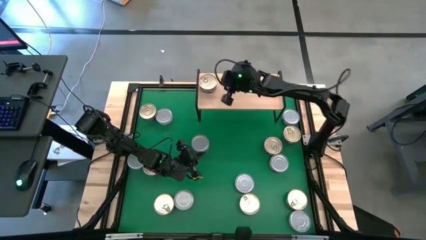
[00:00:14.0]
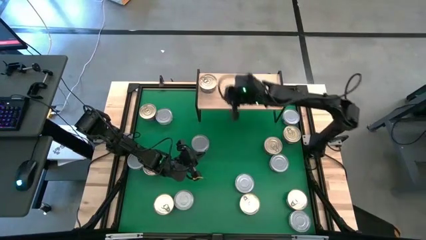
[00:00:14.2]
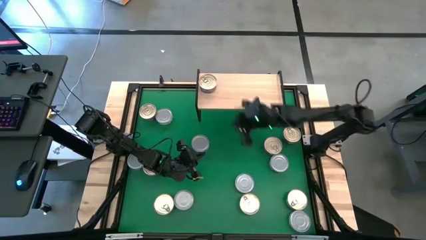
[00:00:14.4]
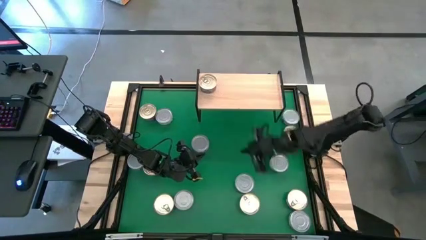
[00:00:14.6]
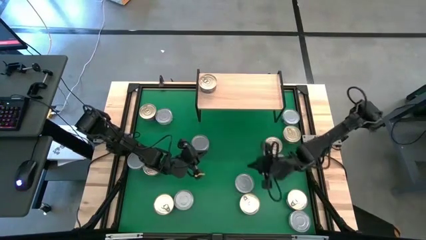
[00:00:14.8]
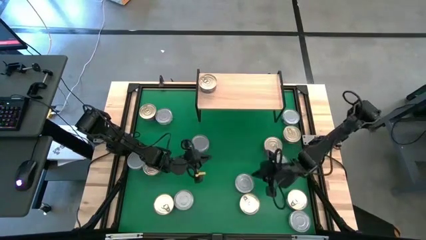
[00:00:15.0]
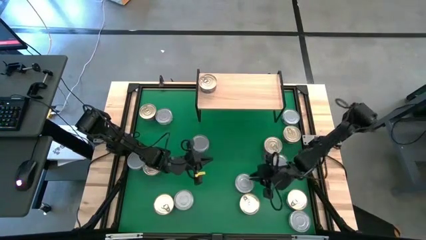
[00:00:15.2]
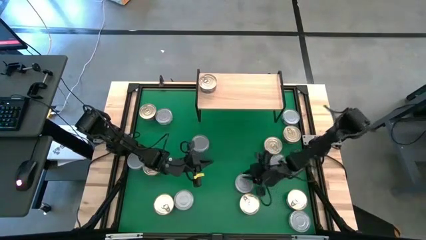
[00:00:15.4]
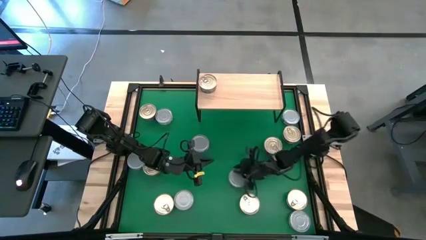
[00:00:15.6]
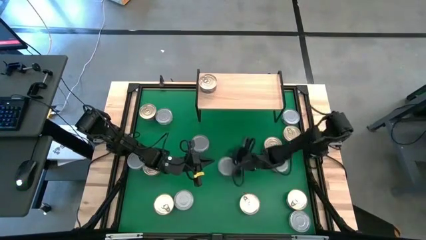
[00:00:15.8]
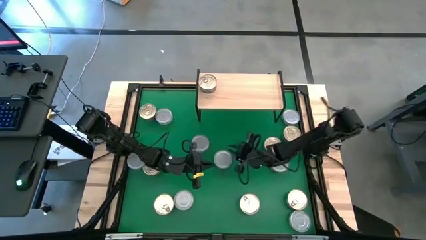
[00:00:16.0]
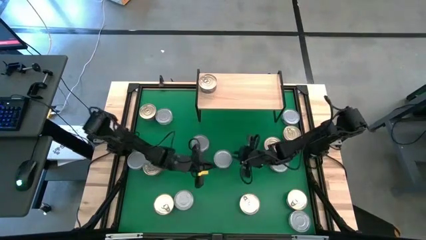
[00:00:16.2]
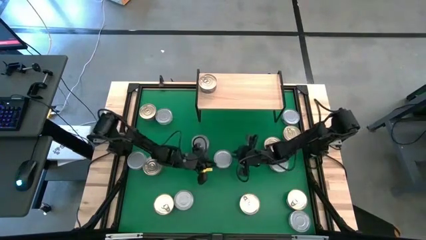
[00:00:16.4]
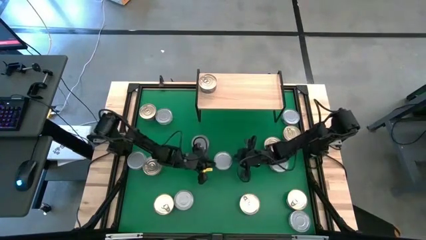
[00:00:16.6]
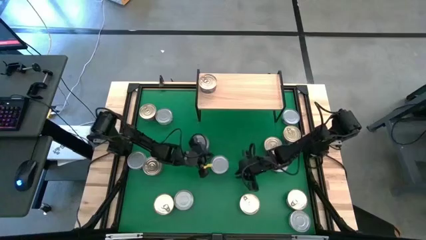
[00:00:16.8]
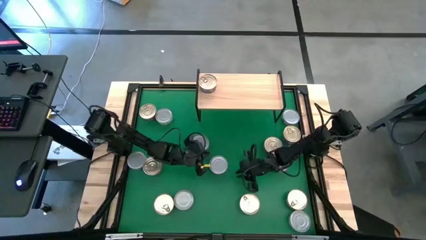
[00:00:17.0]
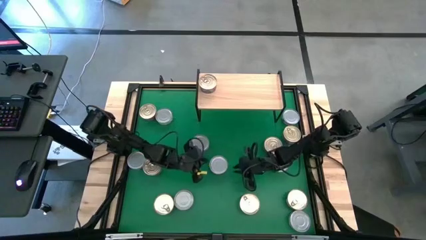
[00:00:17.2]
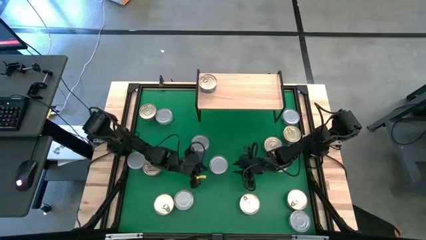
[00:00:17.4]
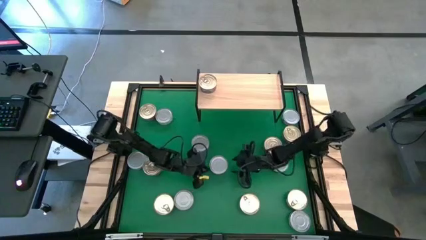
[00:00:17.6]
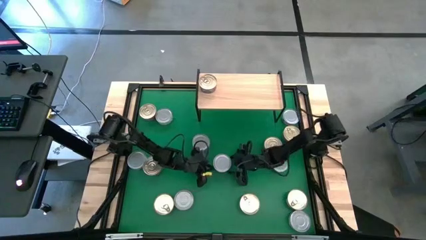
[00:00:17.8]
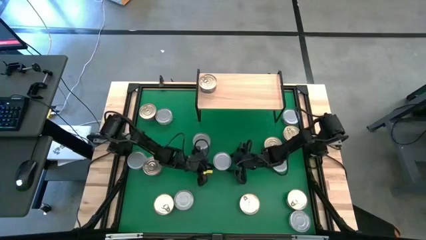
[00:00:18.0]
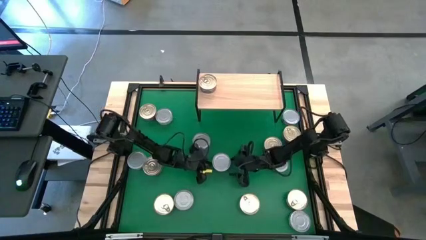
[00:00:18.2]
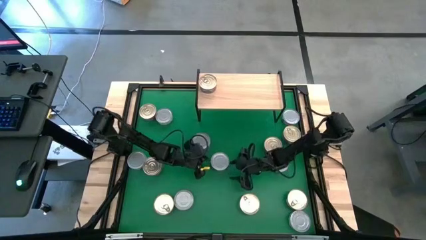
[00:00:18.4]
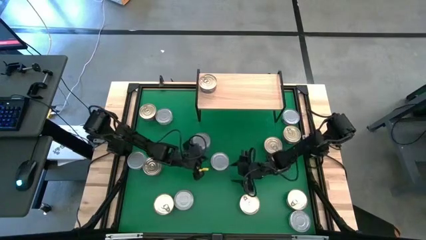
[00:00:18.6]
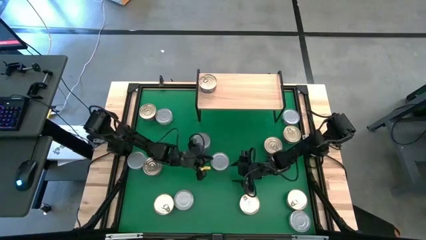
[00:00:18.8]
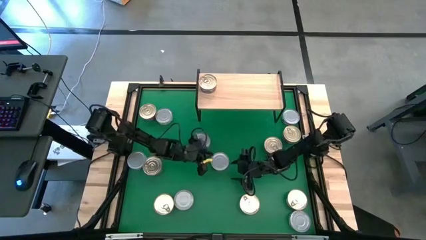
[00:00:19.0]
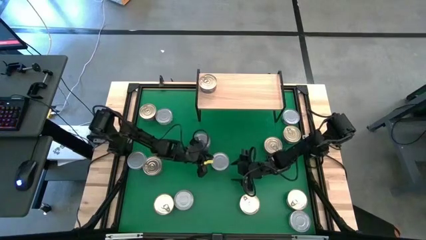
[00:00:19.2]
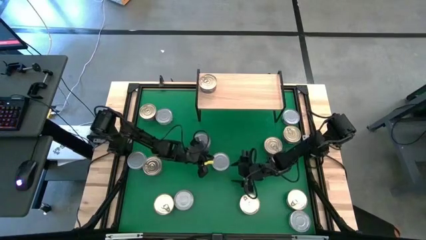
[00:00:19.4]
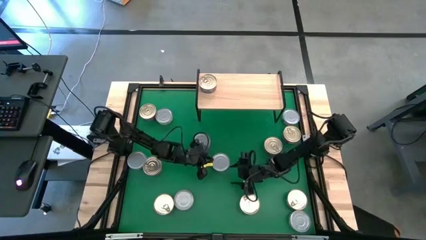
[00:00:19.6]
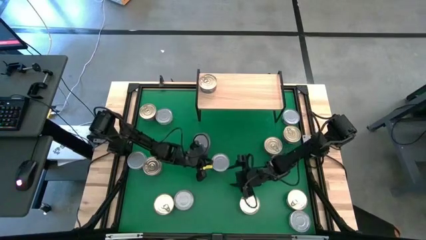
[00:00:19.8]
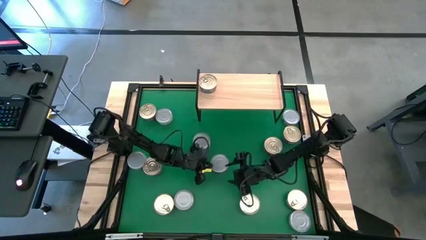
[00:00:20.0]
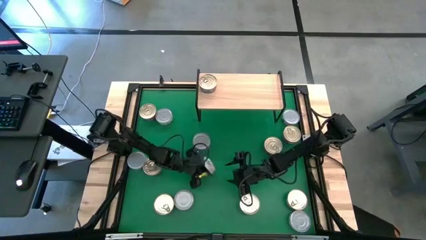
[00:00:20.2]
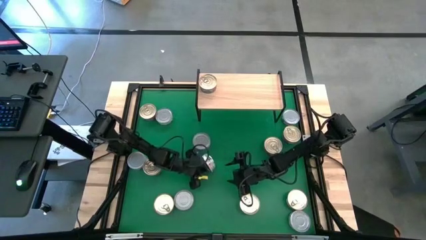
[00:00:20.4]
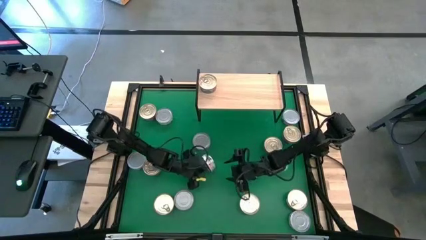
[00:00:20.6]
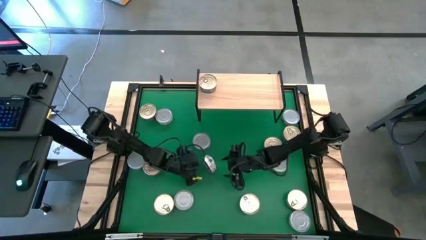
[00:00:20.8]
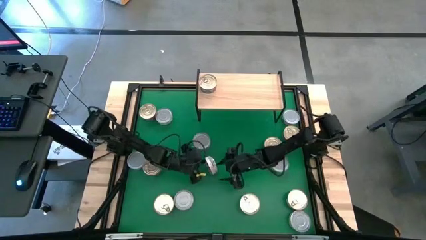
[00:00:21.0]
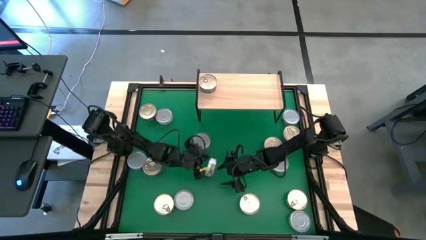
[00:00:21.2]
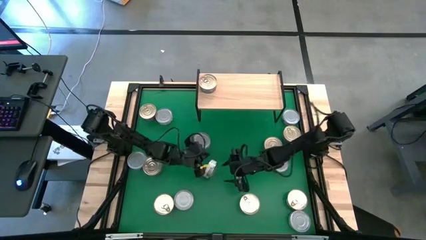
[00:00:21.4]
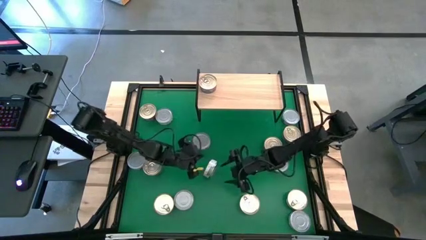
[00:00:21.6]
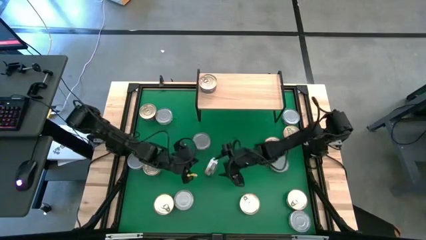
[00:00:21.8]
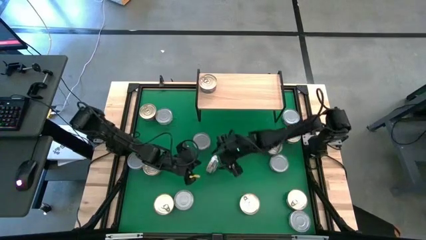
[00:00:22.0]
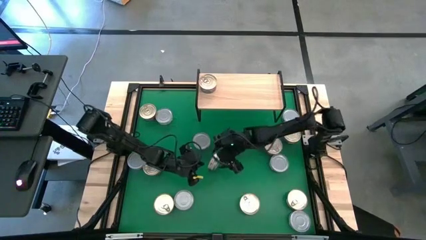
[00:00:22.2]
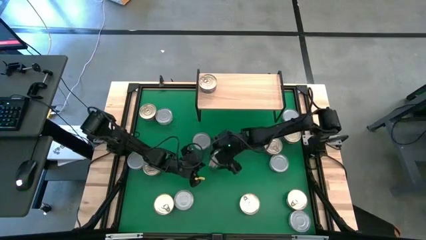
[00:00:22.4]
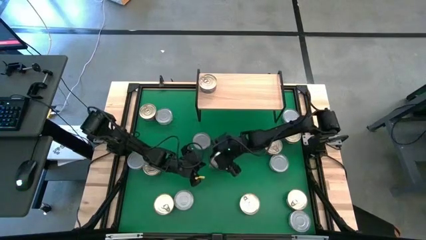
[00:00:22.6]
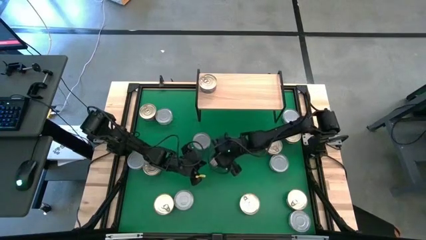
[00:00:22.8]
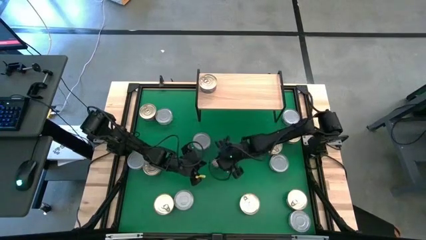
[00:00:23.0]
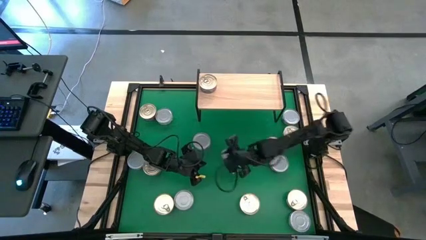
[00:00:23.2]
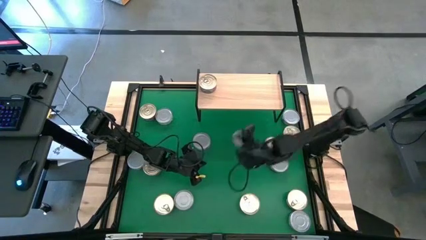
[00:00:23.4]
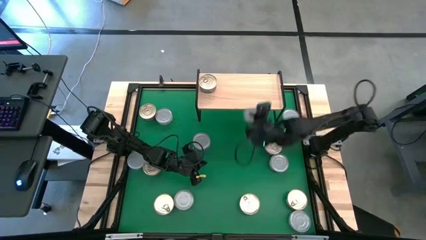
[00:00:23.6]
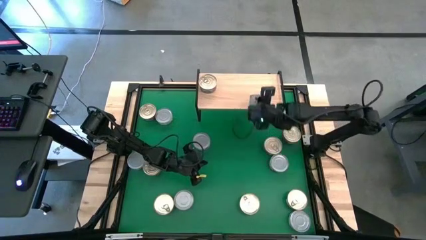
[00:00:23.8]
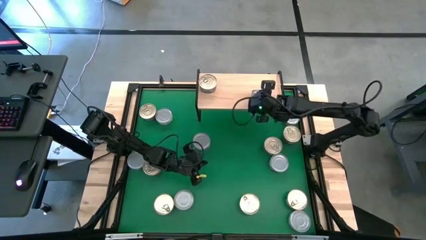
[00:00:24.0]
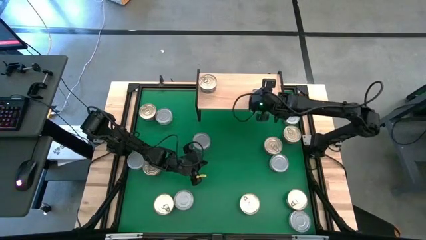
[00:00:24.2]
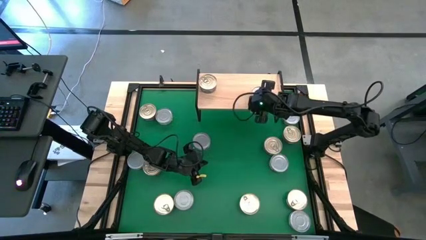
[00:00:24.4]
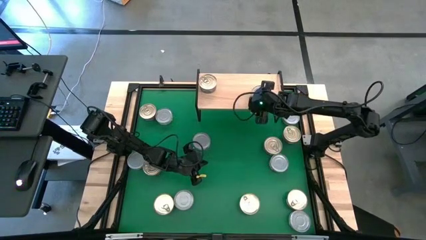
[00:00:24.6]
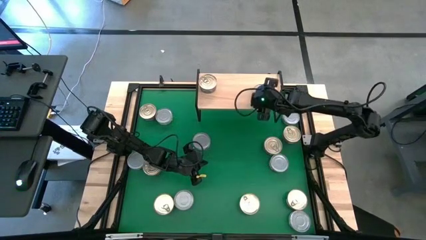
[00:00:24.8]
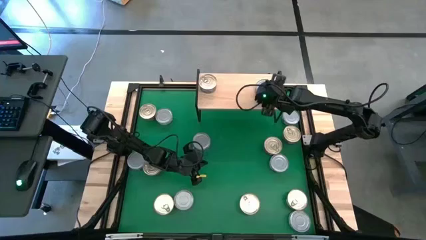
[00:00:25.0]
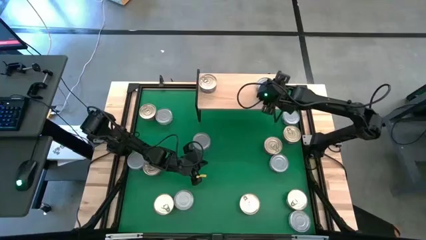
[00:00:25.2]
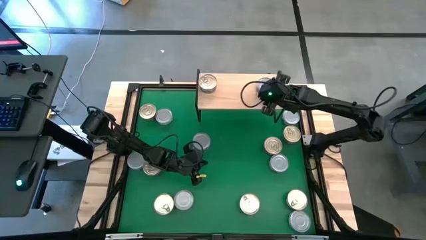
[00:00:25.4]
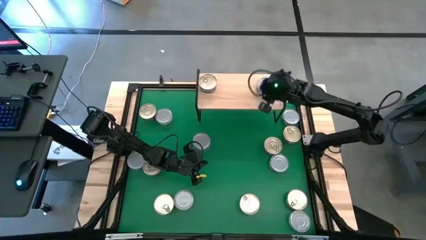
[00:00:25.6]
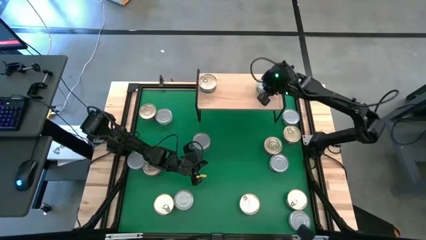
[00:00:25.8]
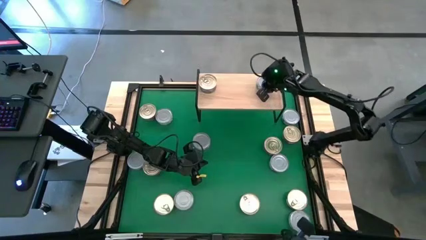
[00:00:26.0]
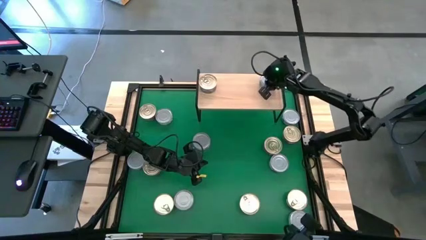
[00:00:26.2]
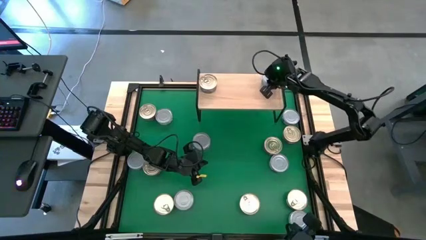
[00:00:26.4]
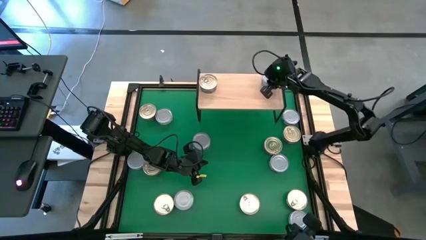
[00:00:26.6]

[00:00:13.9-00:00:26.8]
Task: Stack canned seafood by type on shelf
Put the green tuna can on the shelf

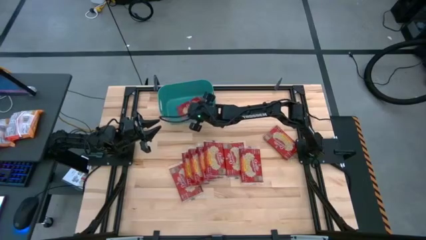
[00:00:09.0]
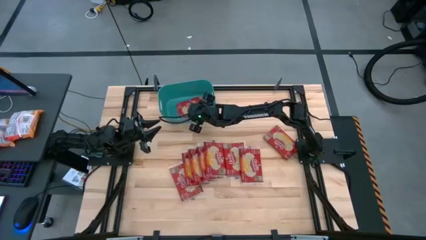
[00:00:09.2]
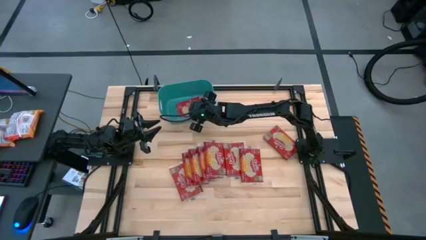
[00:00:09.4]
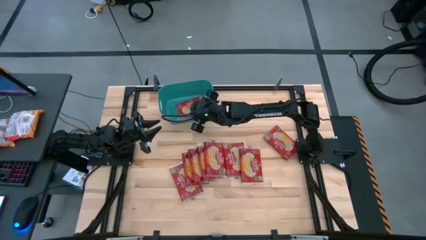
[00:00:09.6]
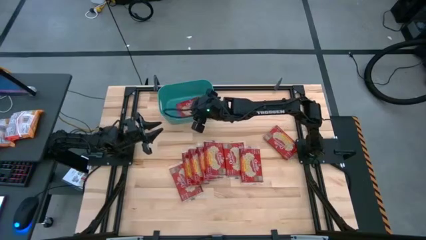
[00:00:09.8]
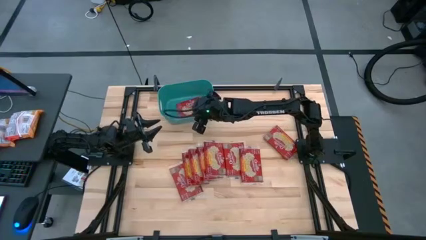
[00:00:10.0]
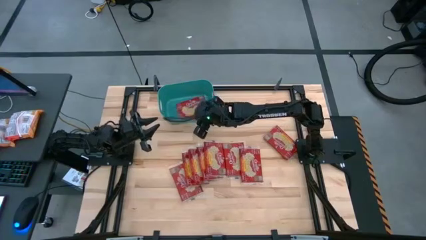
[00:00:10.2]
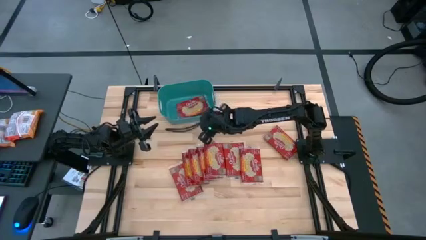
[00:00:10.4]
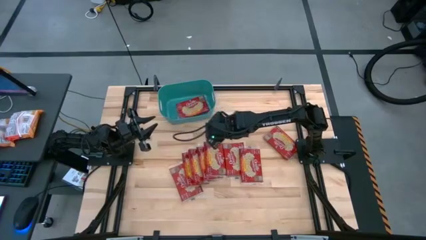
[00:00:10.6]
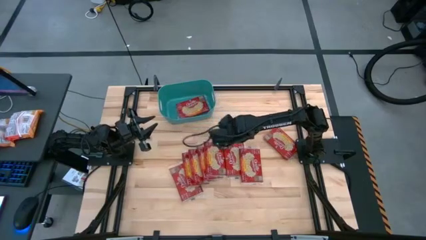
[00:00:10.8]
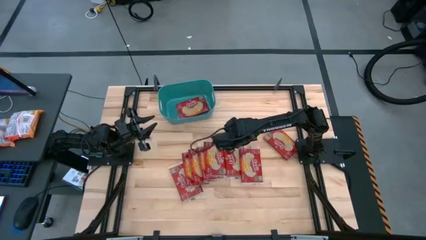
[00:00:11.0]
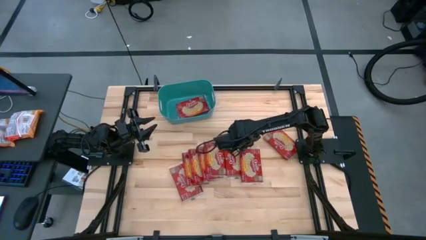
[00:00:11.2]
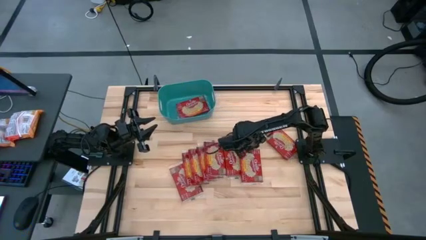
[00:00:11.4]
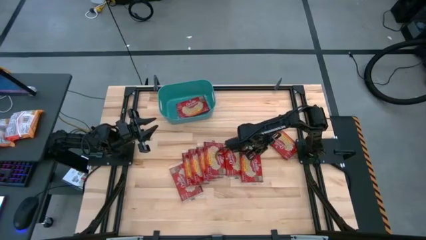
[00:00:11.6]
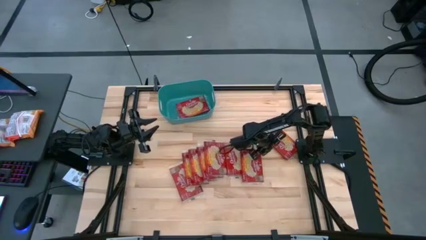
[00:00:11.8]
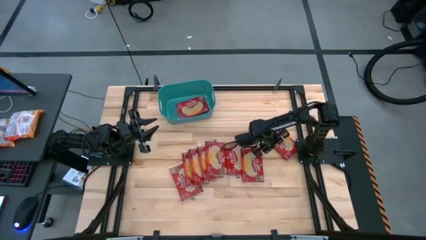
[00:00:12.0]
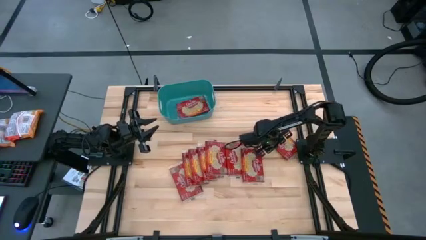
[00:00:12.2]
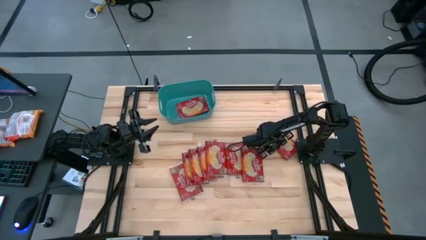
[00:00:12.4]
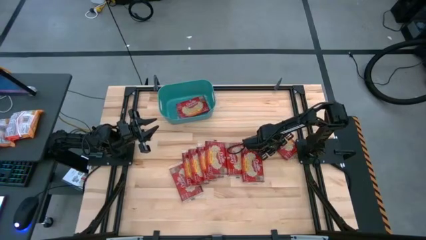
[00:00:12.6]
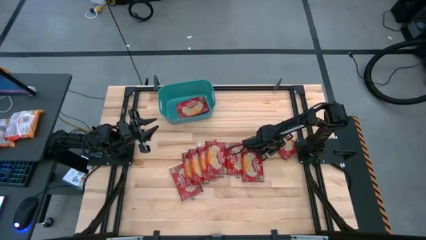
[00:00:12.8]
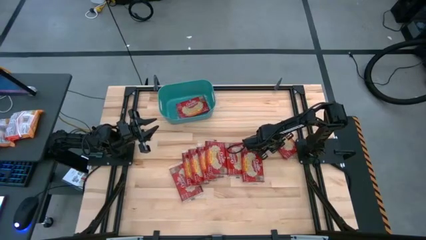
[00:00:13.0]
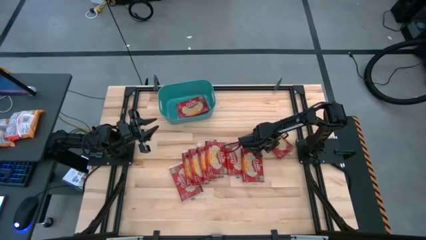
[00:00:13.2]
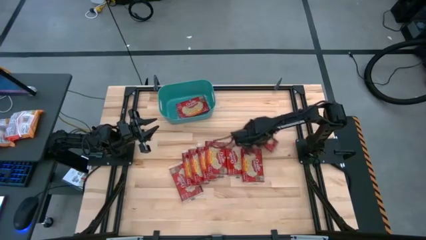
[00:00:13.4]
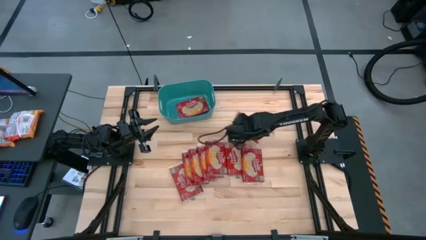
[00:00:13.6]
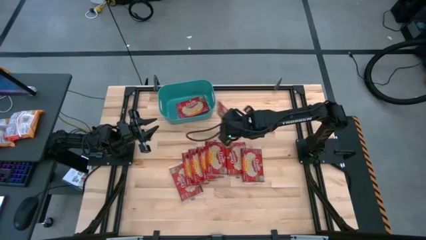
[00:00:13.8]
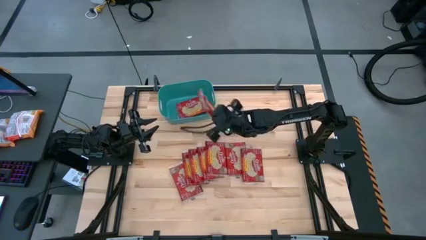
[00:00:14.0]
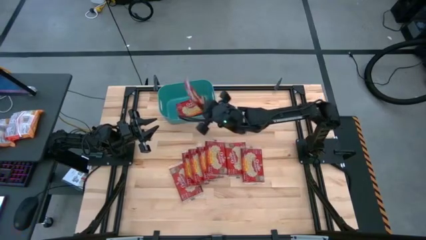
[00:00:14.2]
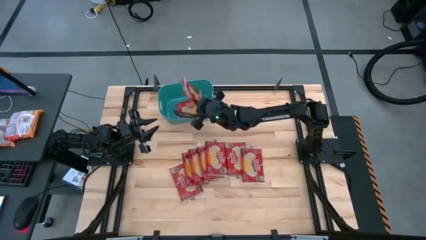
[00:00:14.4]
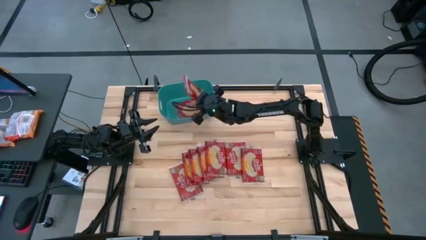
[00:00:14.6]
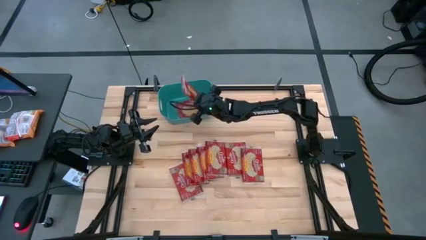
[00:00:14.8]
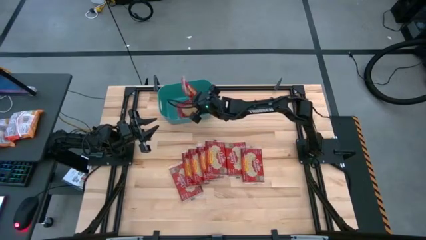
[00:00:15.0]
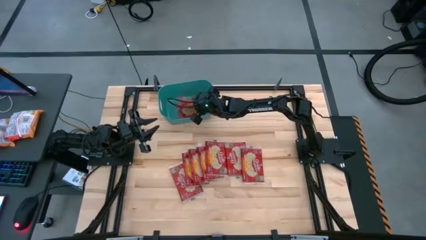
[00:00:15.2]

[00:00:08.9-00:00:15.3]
Task: Sort popcorn bags into baskets
Put the red popcorn bag into the blue container
